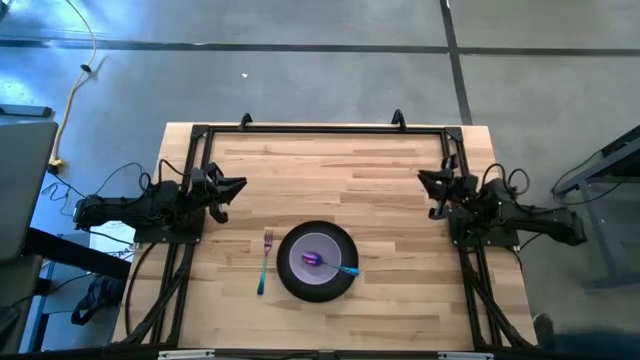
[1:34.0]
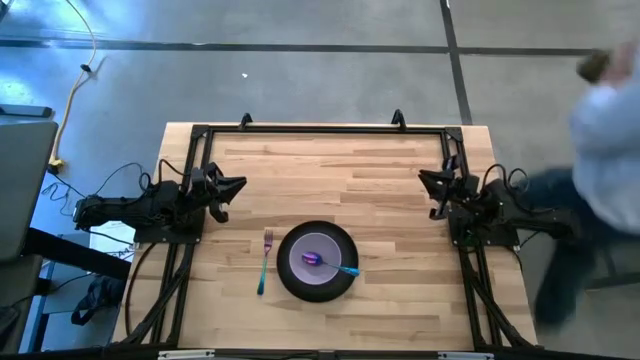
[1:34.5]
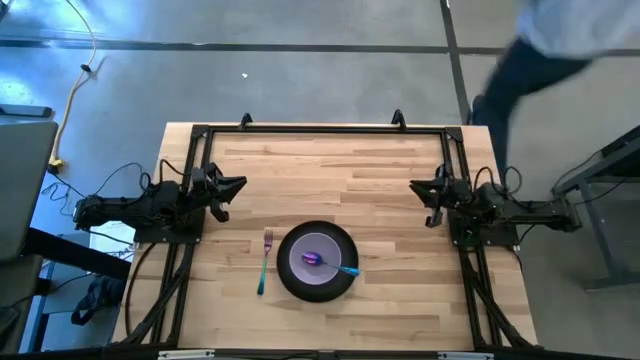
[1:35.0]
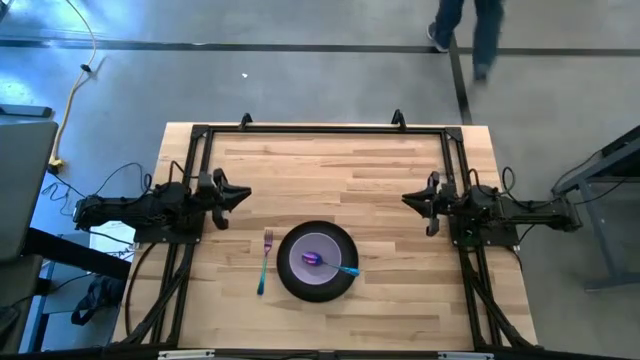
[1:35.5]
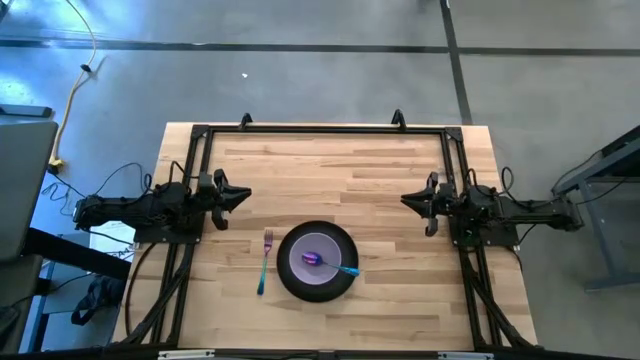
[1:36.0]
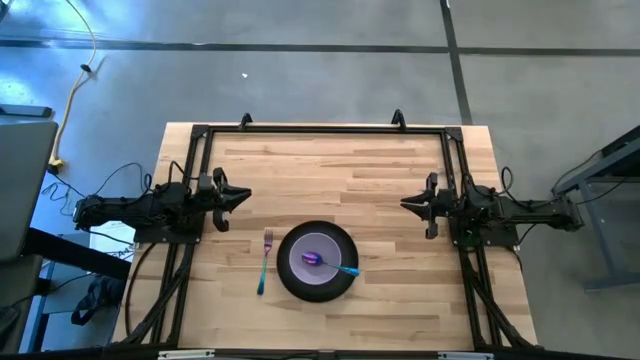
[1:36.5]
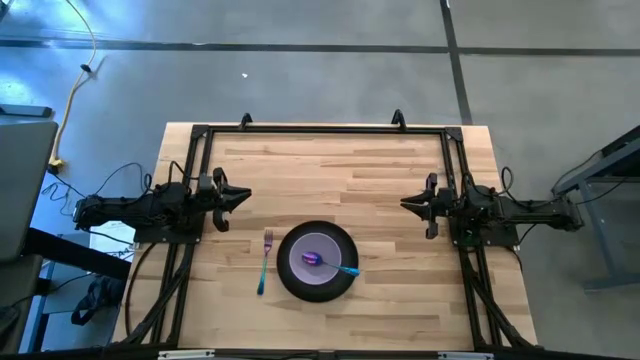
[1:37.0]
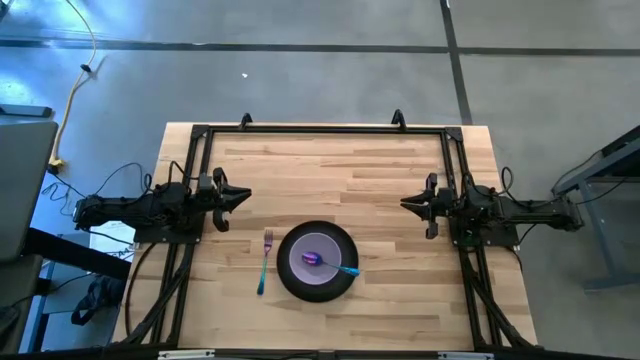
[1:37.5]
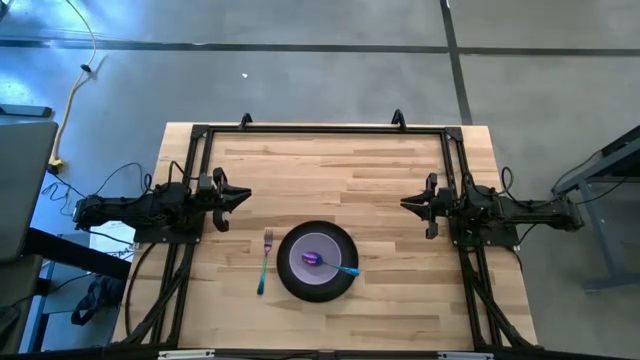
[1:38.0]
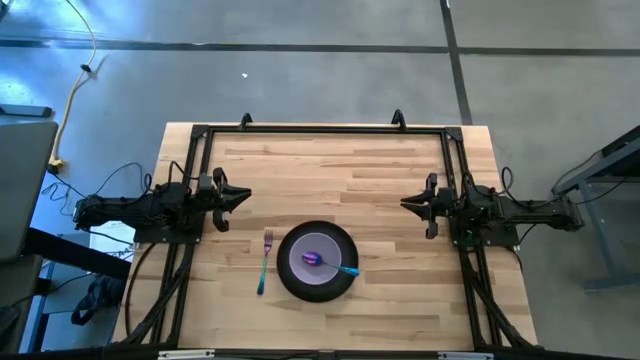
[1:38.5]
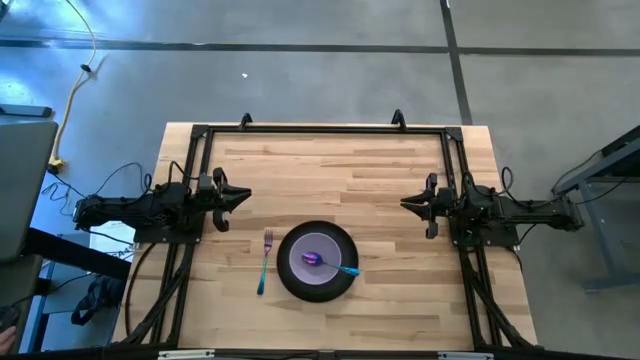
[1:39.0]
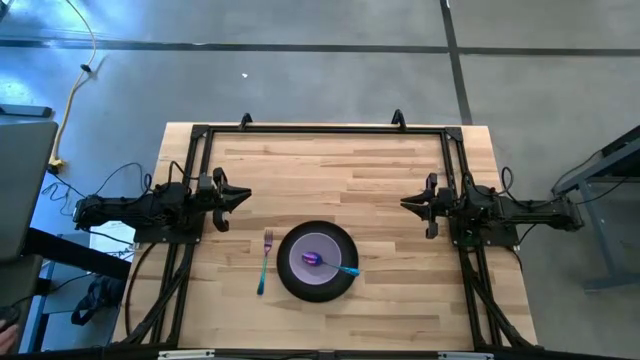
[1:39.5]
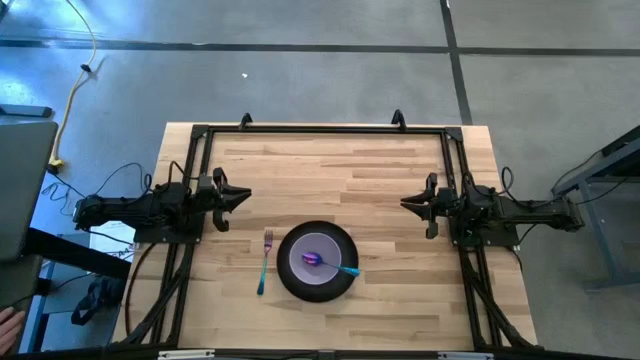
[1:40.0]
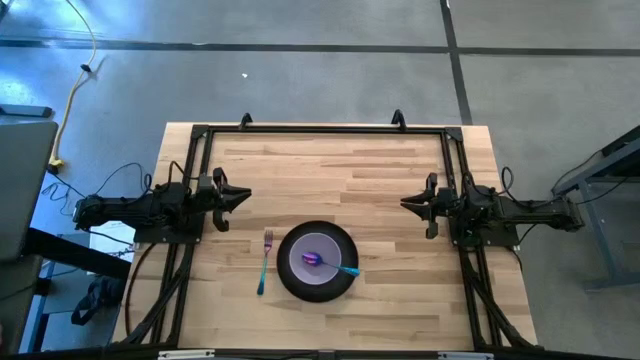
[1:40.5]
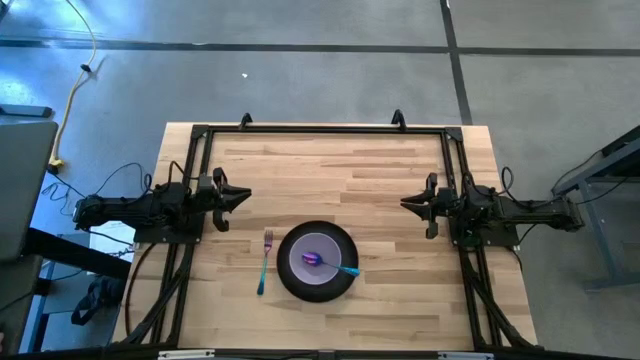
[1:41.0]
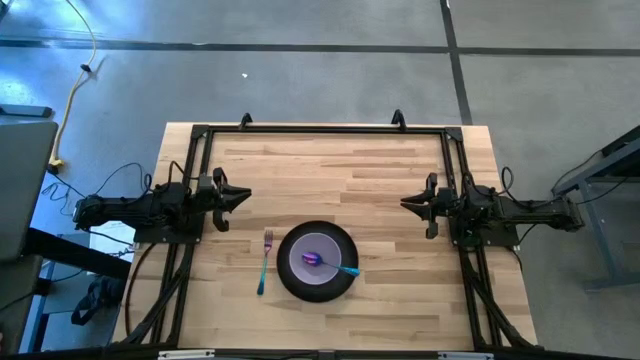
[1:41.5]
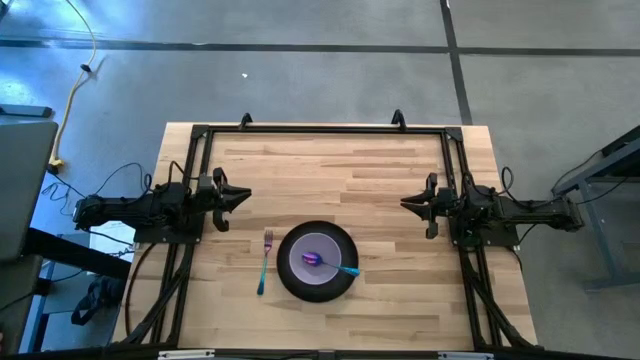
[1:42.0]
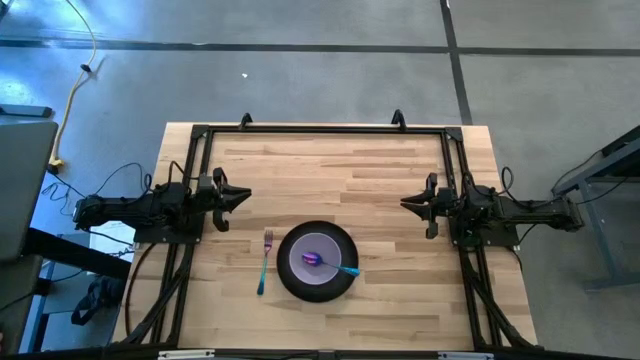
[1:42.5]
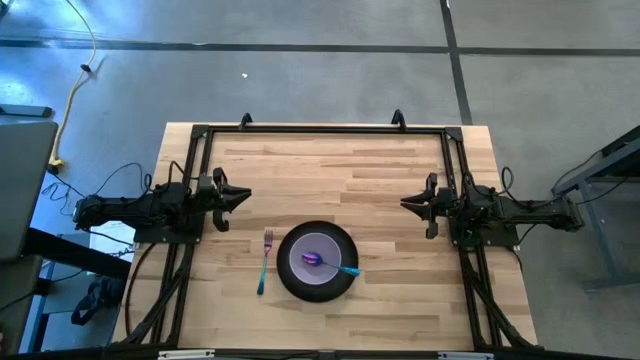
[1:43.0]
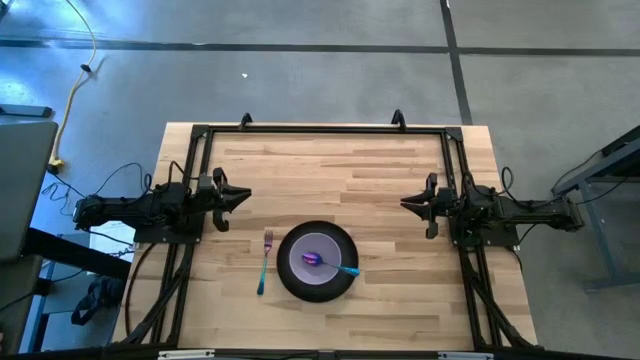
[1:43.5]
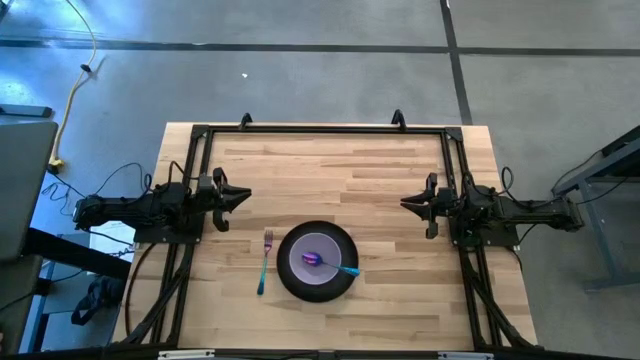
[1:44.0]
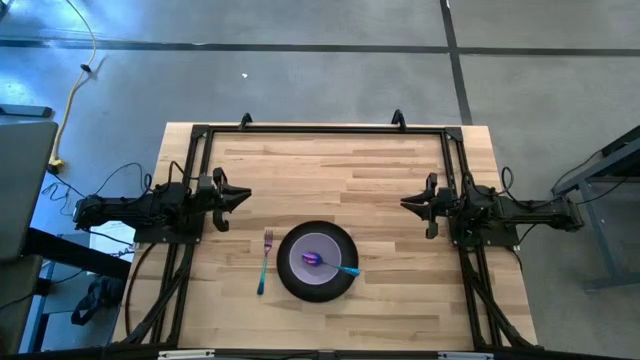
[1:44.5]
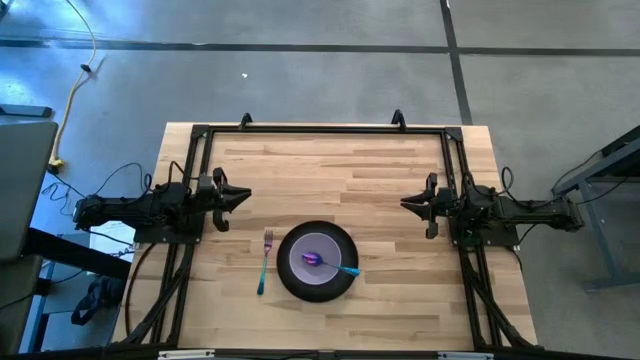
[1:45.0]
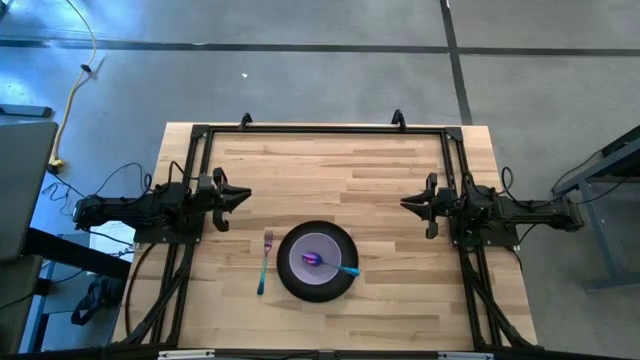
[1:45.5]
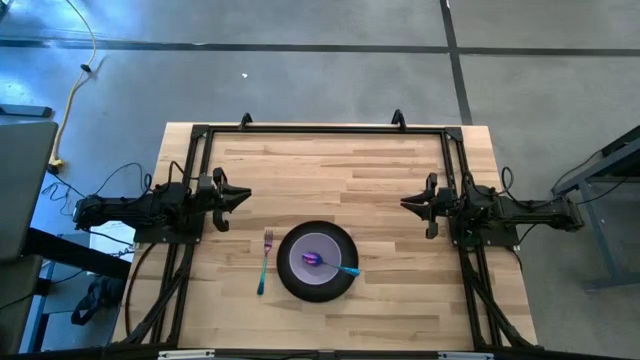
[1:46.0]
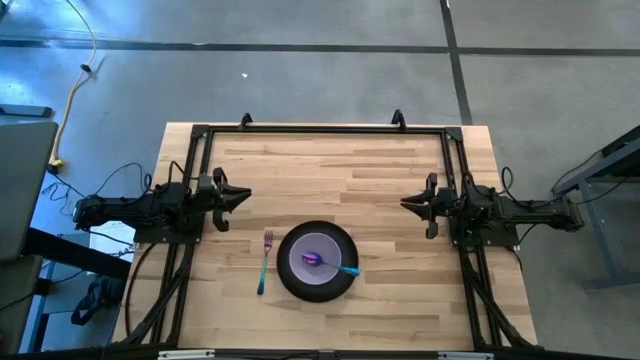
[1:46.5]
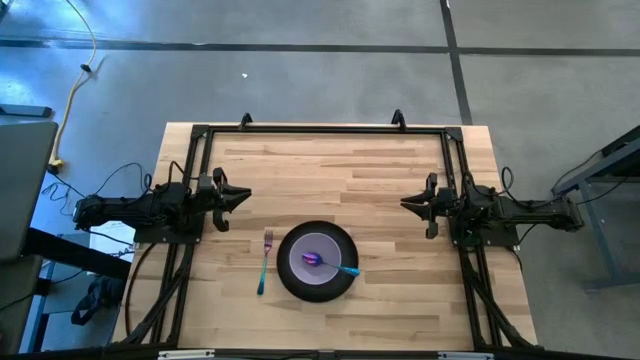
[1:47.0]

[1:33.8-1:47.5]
Task: Set table place
Return to Home Position

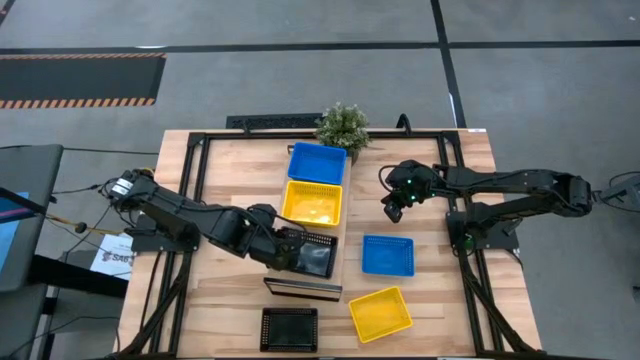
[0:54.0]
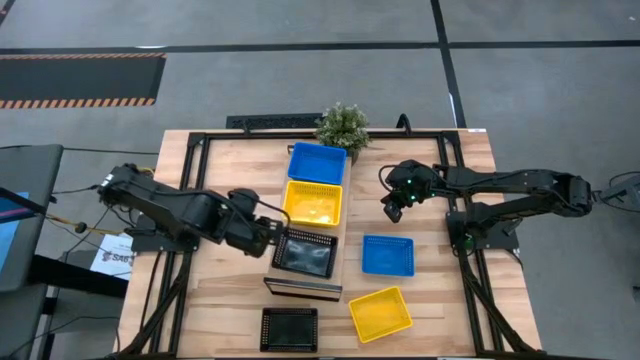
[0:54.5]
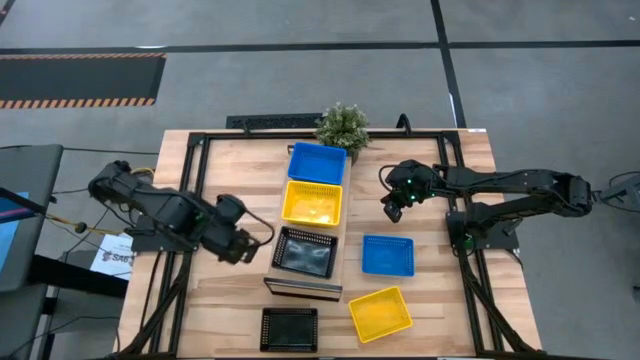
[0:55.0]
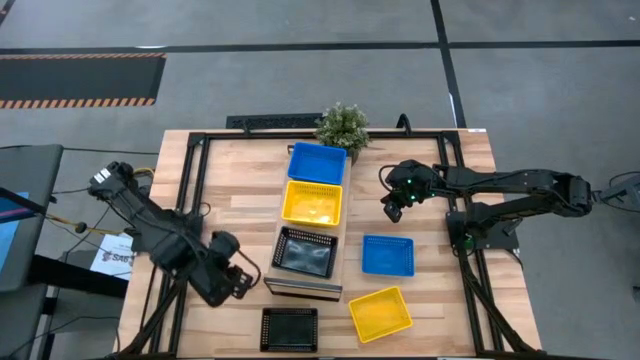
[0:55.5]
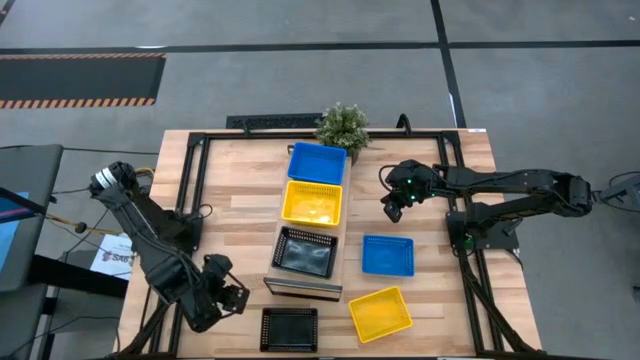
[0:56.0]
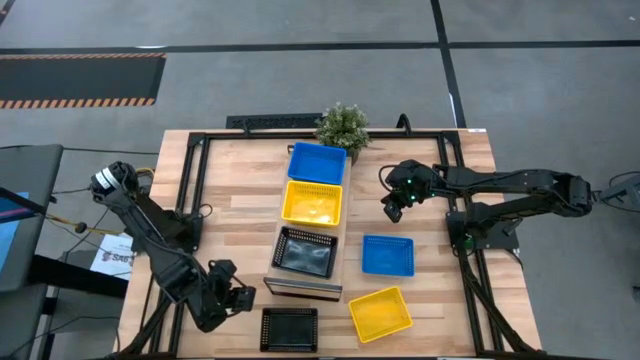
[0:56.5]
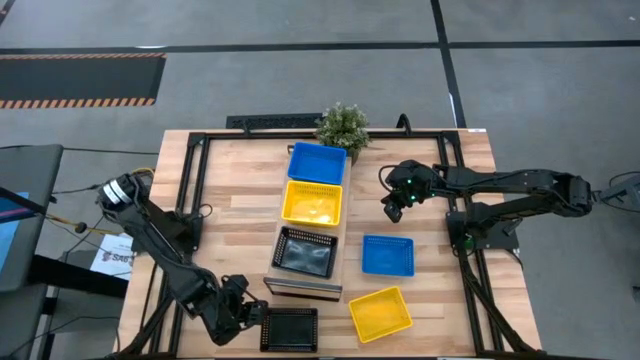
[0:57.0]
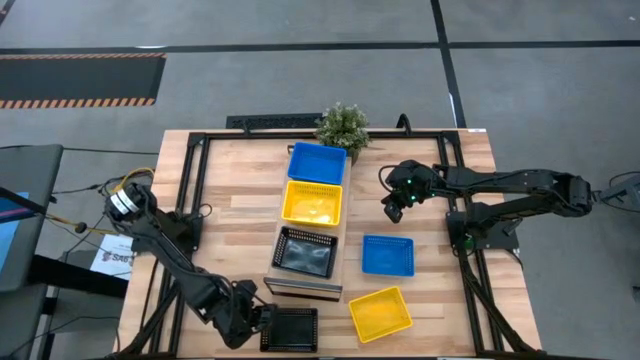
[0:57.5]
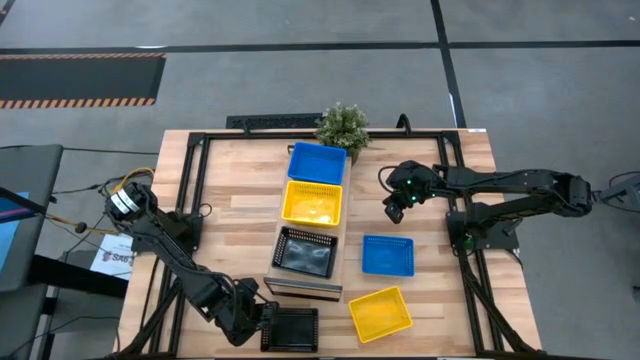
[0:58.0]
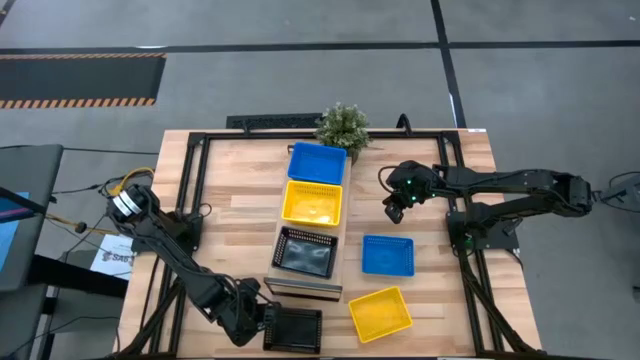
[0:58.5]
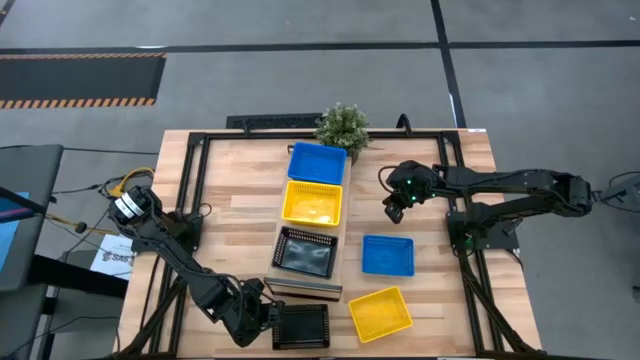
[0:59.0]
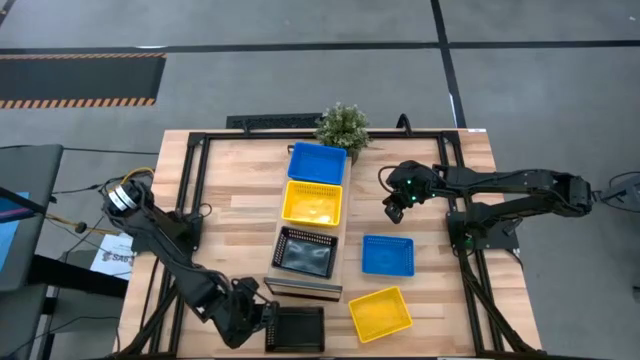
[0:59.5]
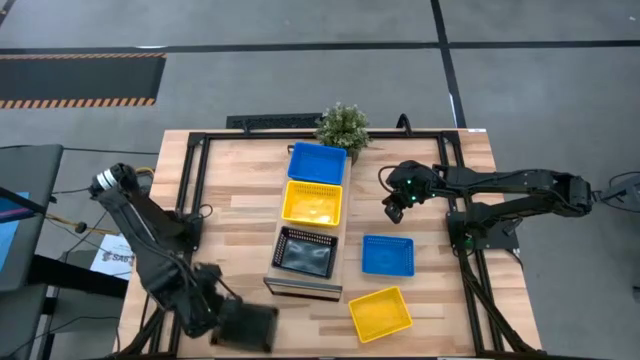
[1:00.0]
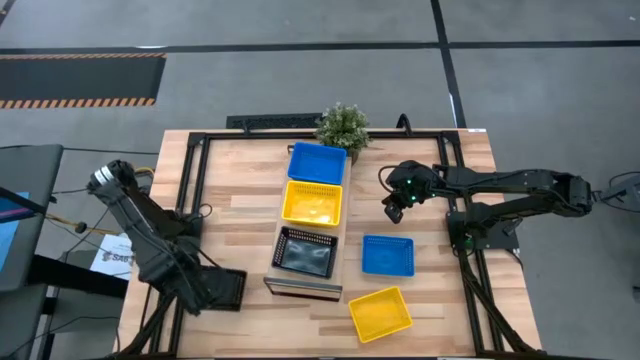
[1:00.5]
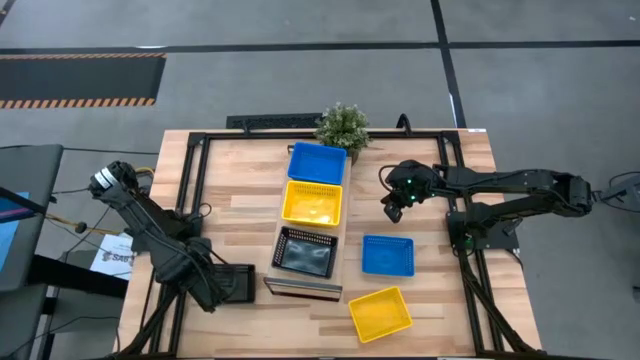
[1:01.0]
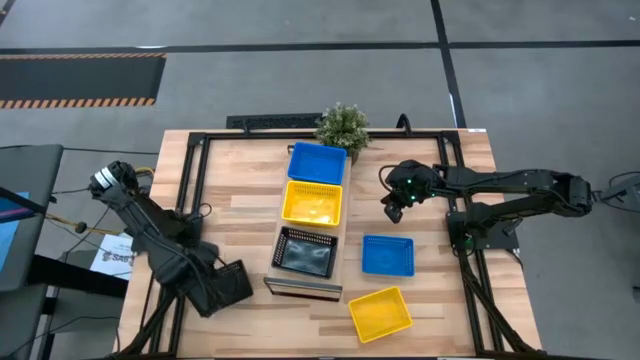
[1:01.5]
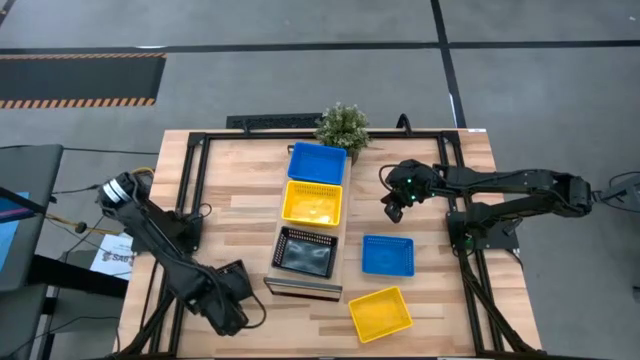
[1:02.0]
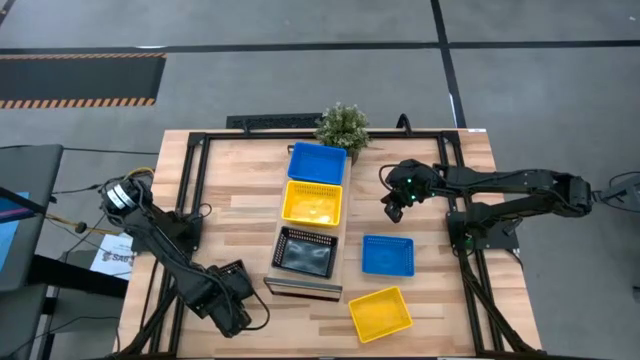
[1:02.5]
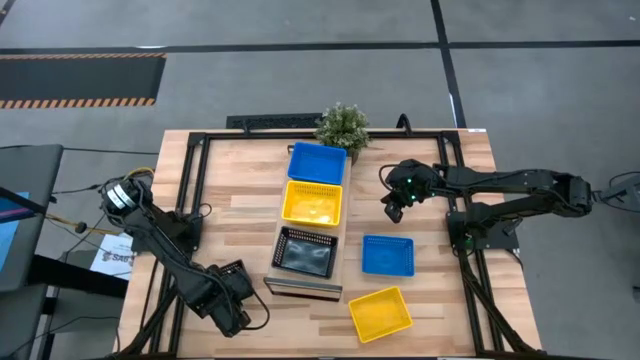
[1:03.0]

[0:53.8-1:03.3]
Task: Stack baskets on shelf by color
Stack the black basket on top of the black basket on the shelf
